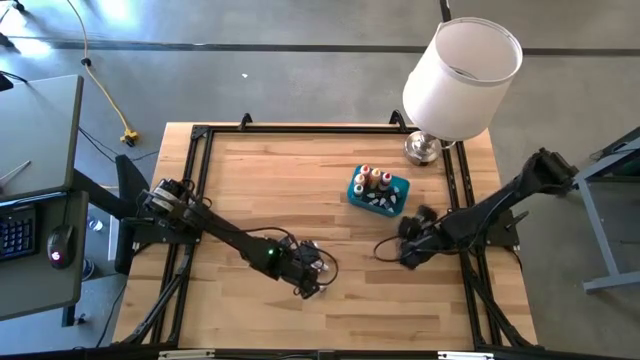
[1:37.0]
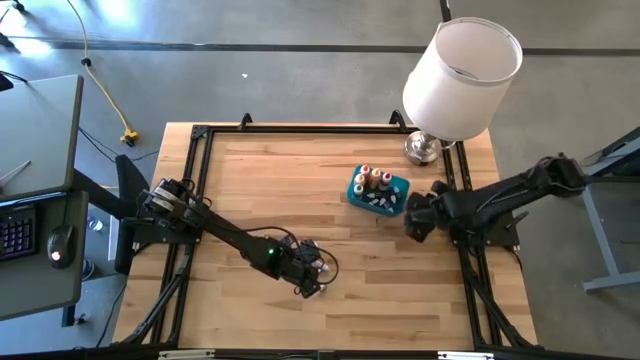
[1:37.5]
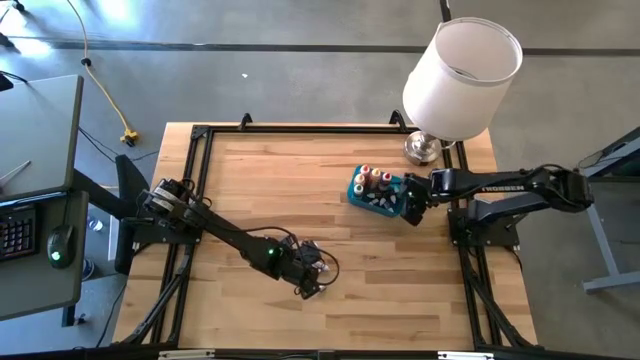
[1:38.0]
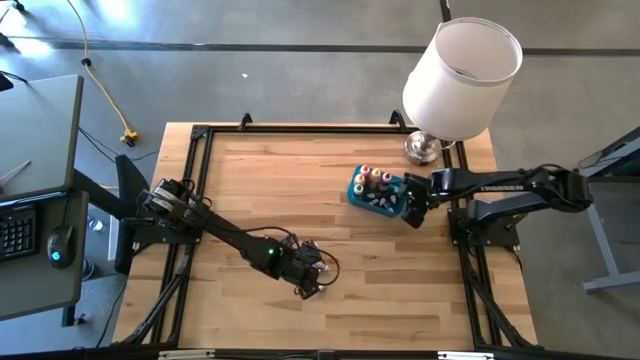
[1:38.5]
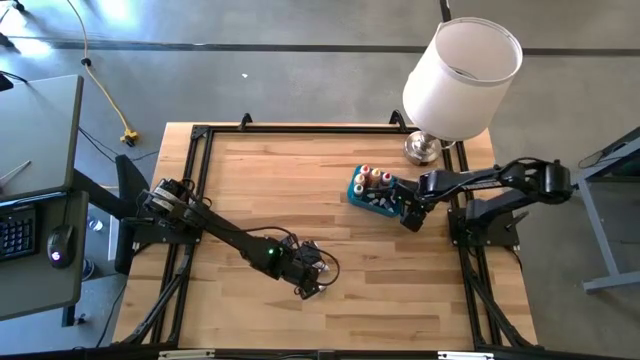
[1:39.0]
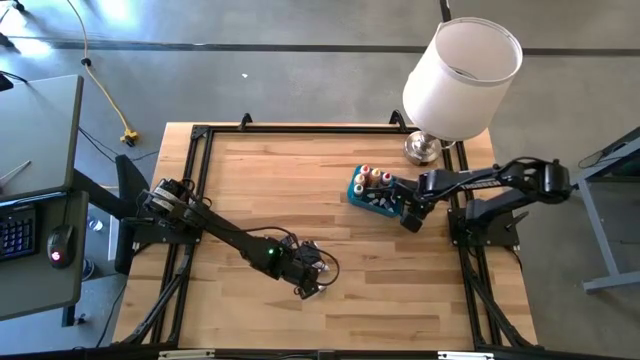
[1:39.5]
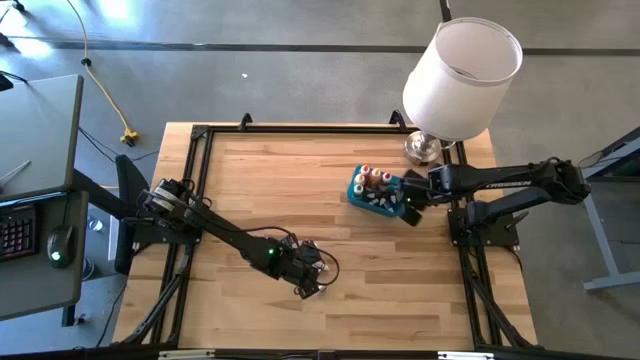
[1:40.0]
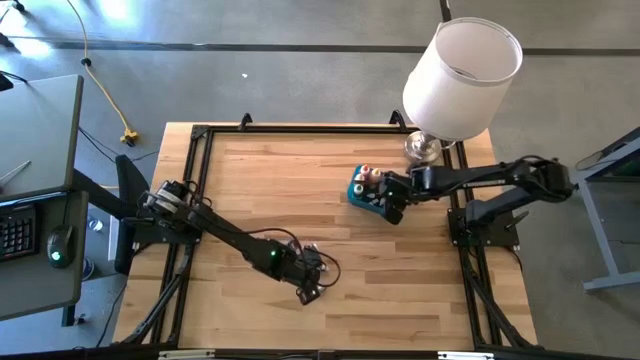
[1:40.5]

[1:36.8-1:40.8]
Task: Pick & Place food coloring
Put the bottom small red food coloring bottle into the blue bin

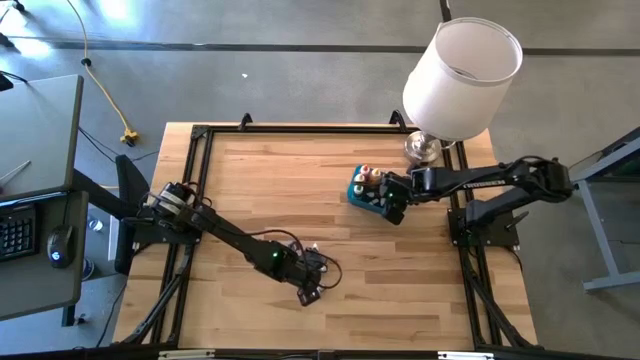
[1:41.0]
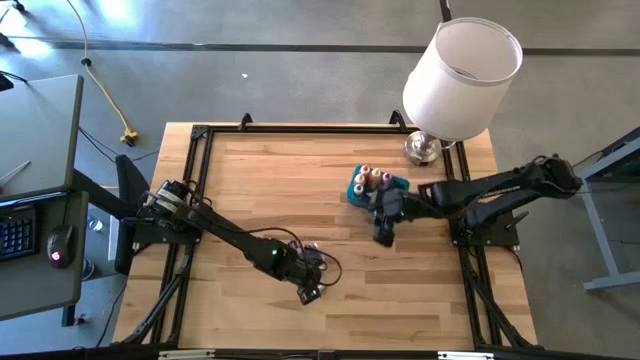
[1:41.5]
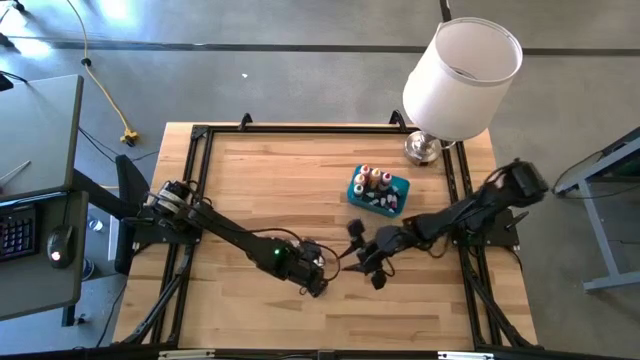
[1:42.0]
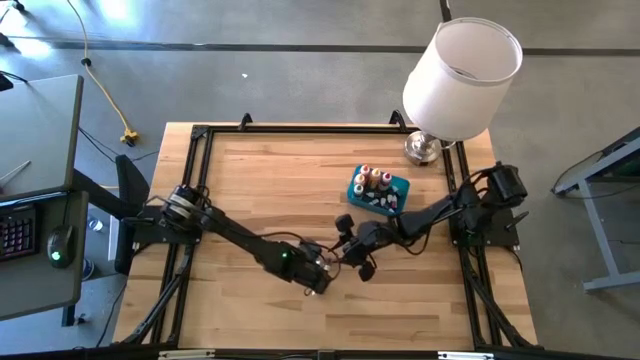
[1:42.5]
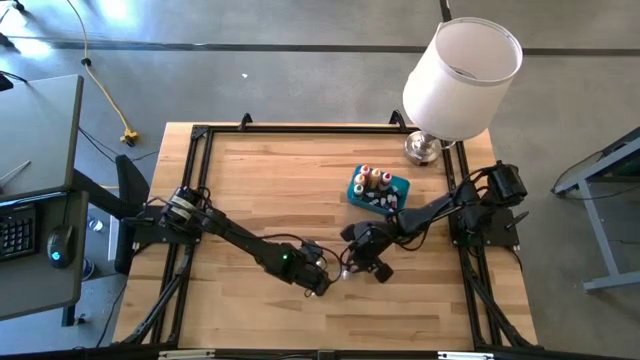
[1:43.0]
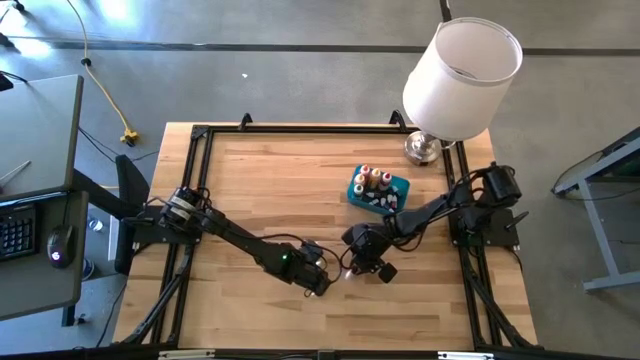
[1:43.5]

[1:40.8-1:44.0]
Put the small pink food coloring bottle into the blue bin

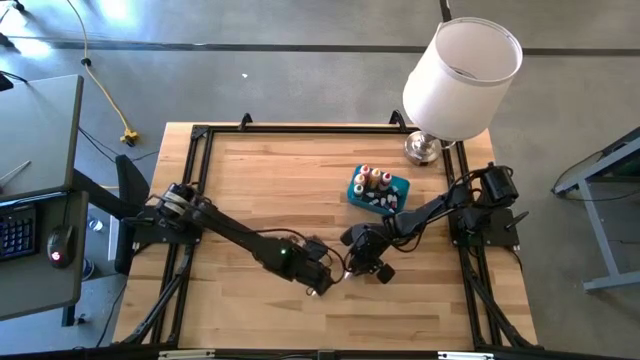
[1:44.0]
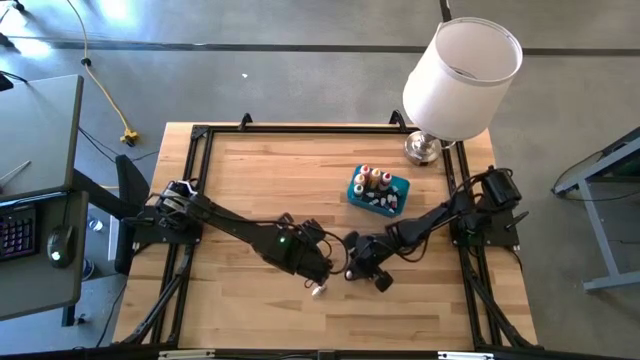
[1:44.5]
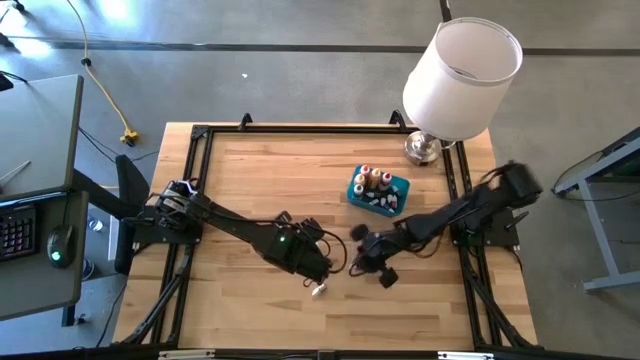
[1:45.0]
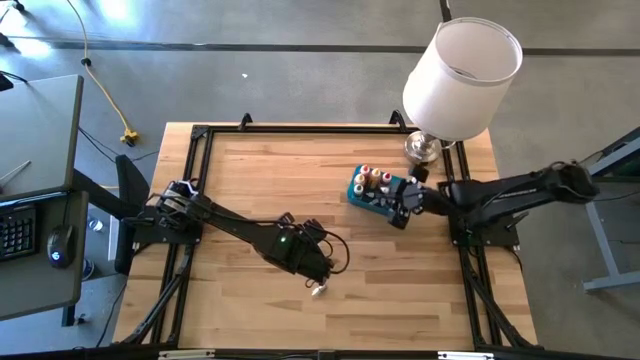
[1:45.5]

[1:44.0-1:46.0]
Put the small red food coloring bottle into the blue bin

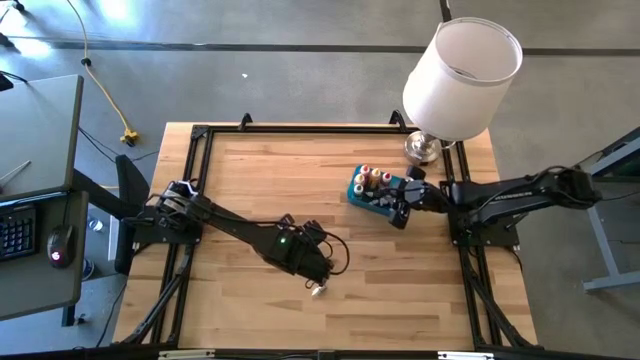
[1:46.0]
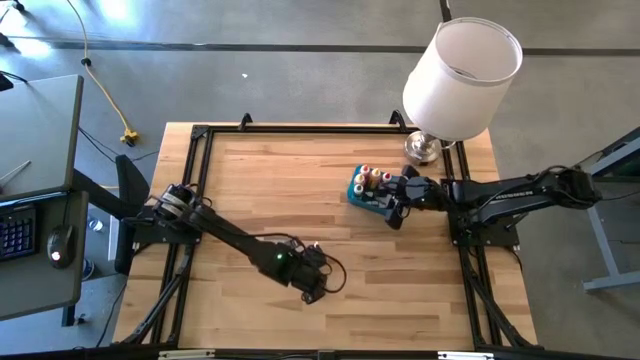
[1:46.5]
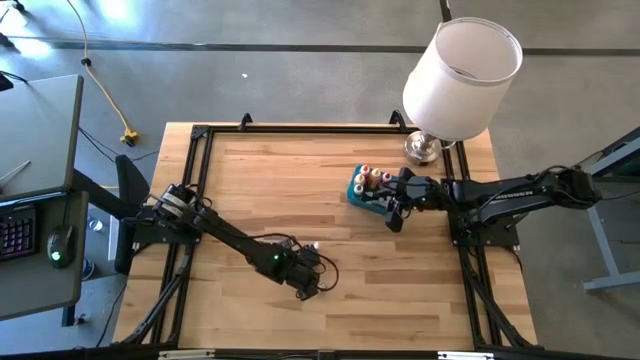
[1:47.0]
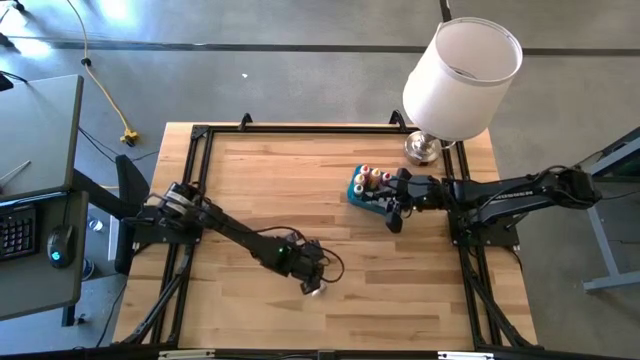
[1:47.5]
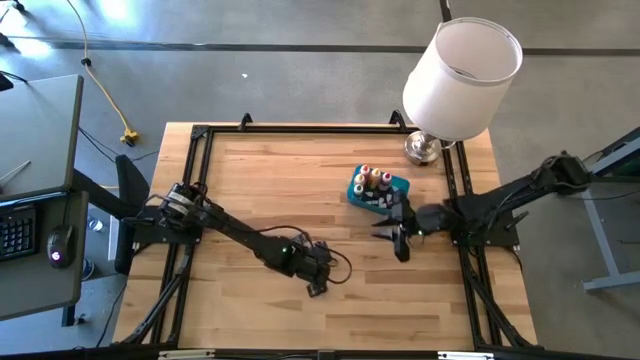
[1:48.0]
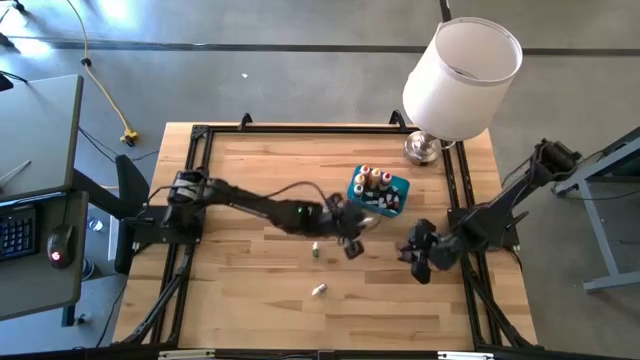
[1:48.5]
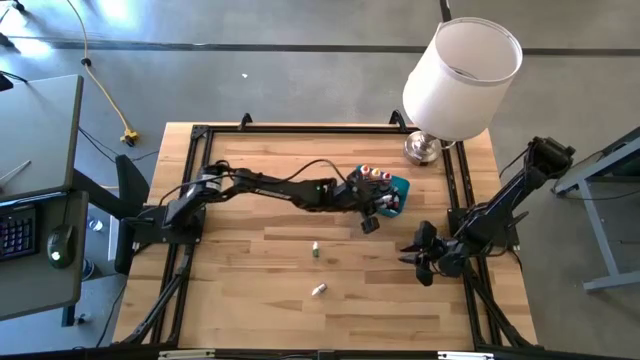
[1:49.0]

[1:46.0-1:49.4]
Put the small pink food coloring bottle into the blue bin

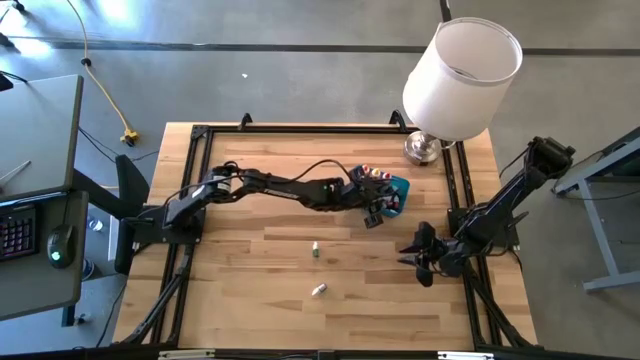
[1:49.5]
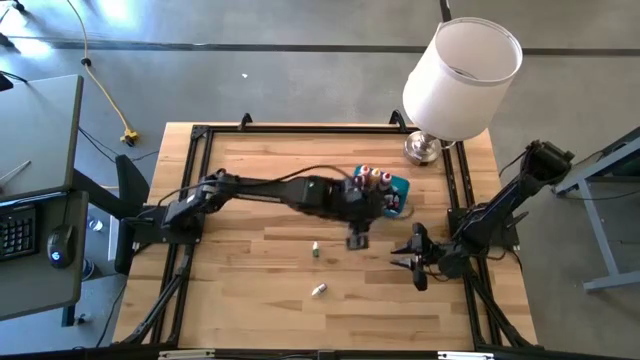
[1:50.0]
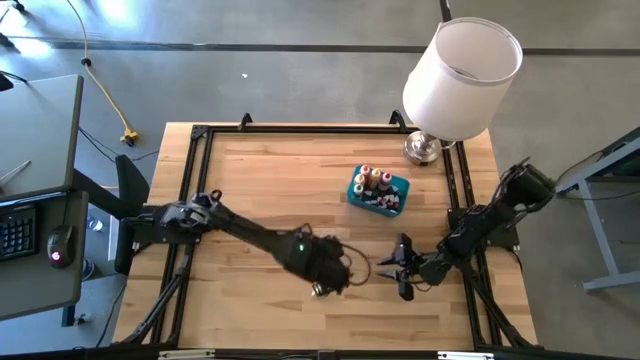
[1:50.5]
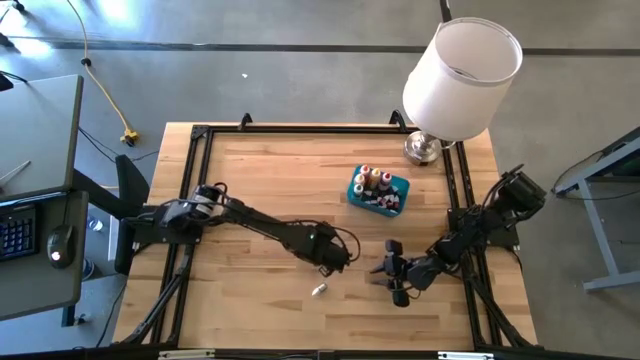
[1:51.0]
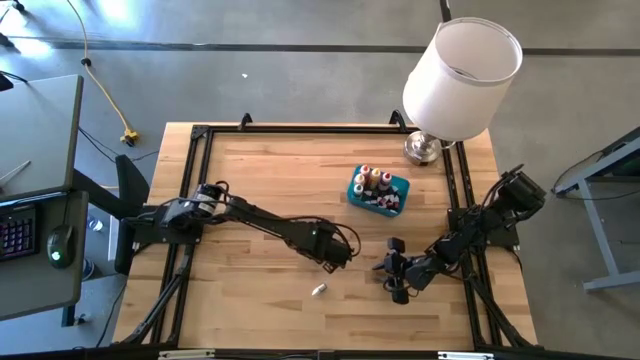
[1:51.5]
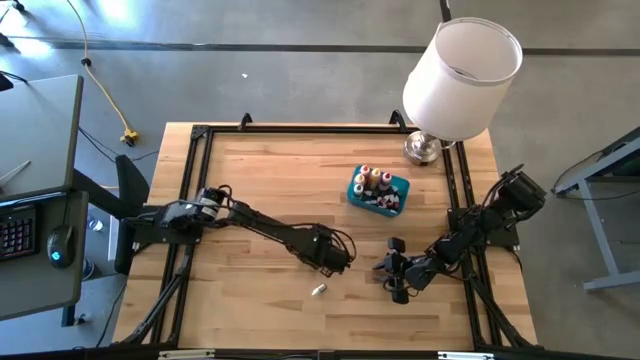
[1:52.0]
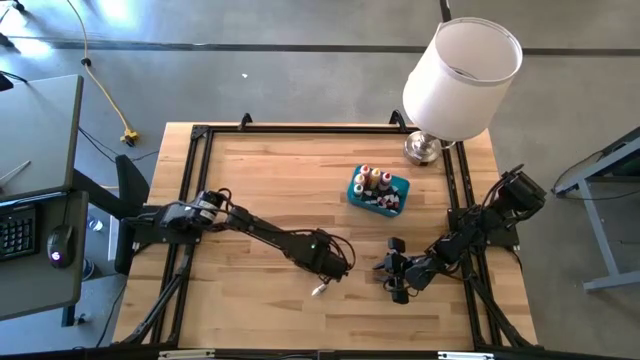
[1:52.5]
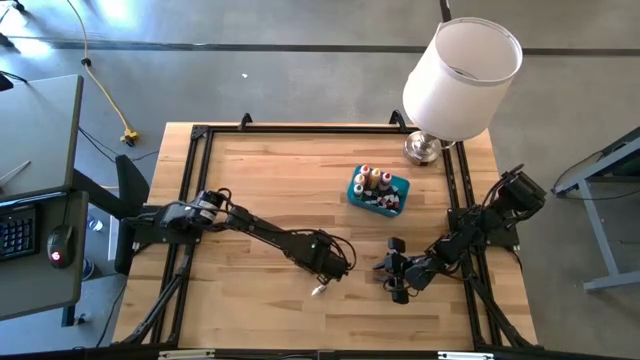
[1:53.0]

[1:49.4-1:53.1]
Put the small green food coloring bottle into the blue bin

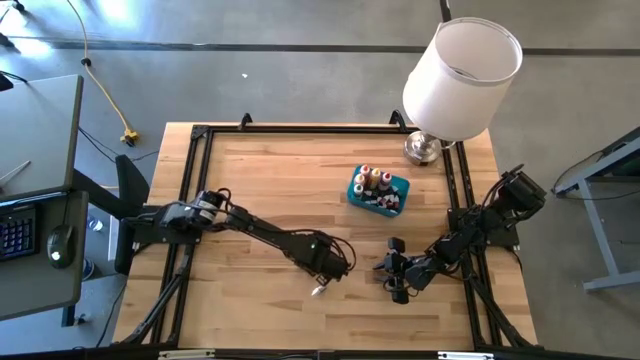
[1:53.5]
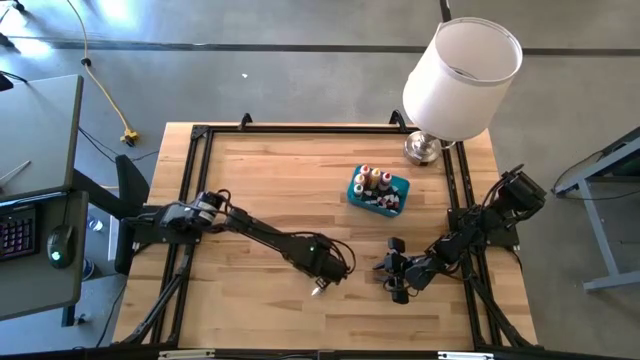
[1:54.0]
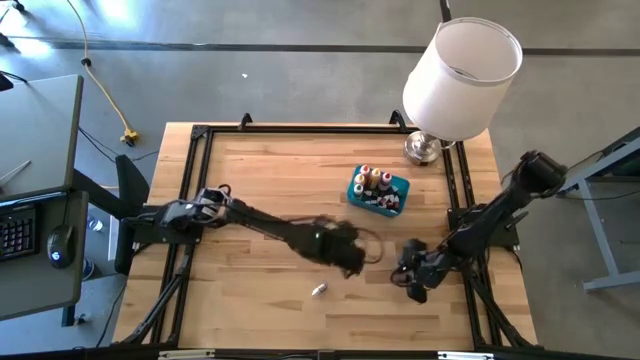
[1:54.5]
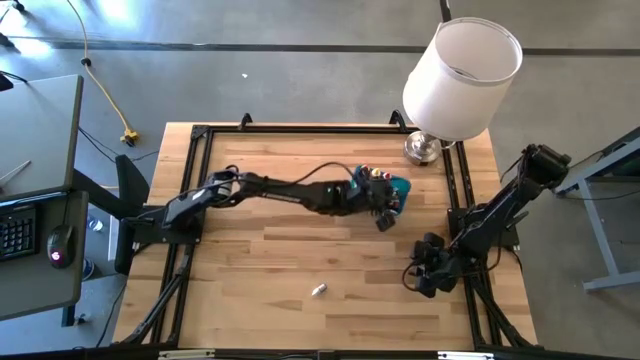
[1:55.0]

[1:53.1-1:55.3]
Put the small green food coloring bottle into the blue bin

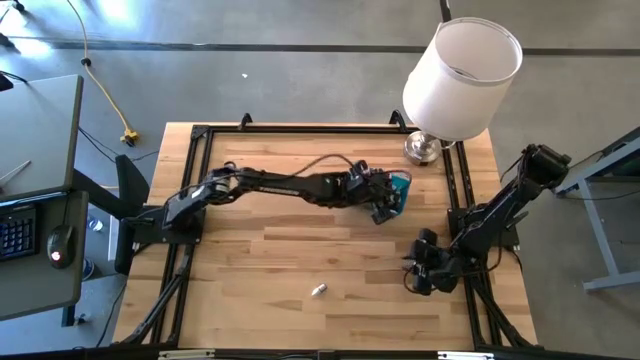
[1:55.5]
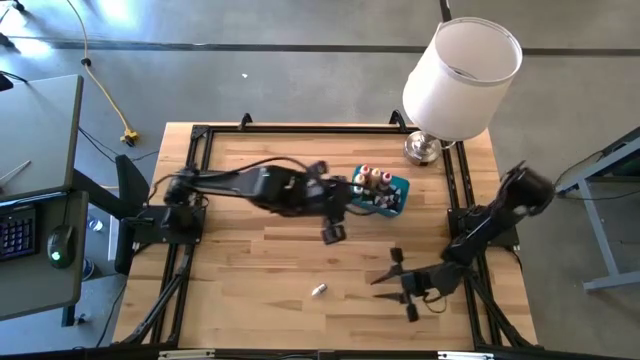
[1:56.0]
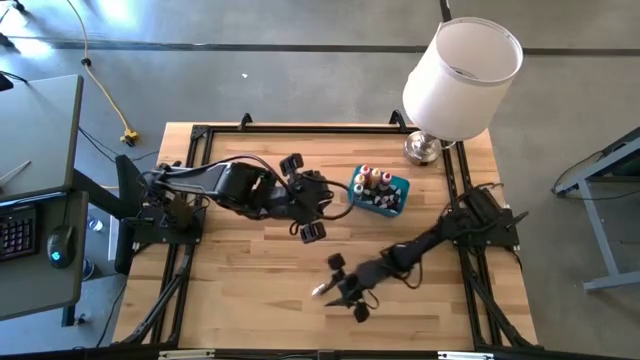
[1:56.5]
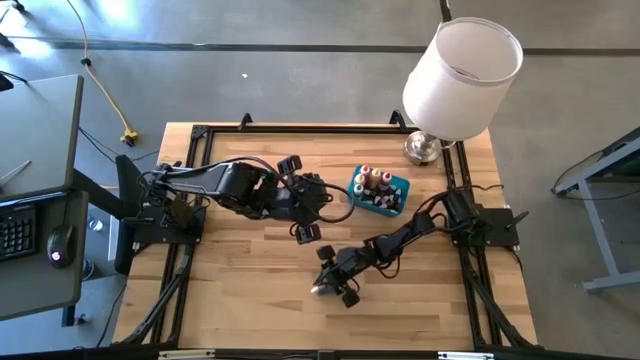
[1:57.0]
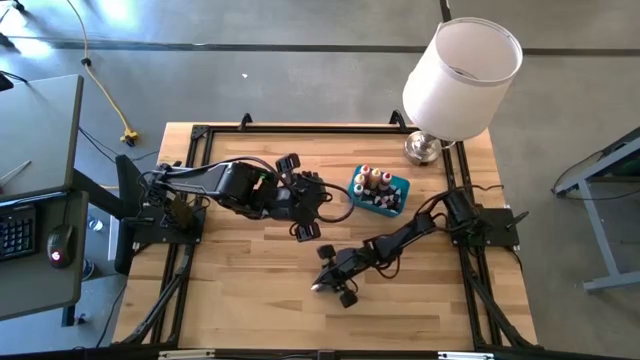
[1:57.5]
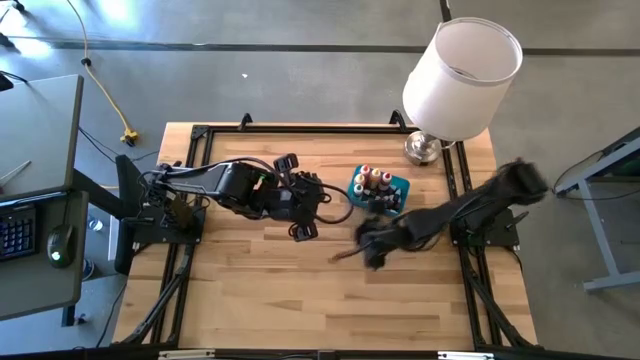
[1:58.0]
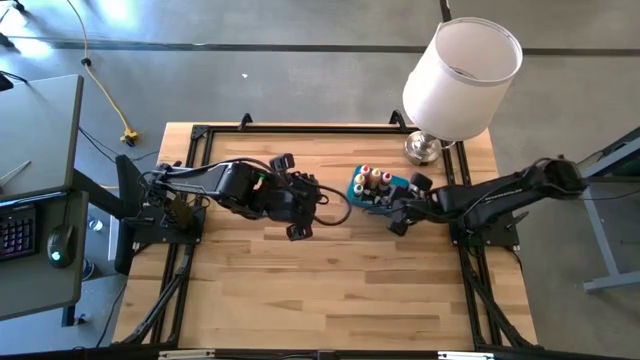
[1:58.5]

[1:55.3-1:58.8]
Put the small purple food coloring bottle into the blue bin
